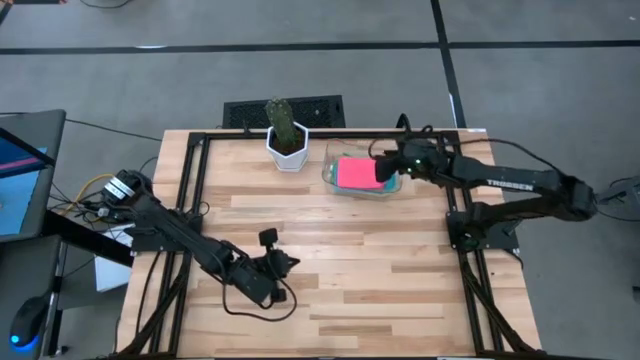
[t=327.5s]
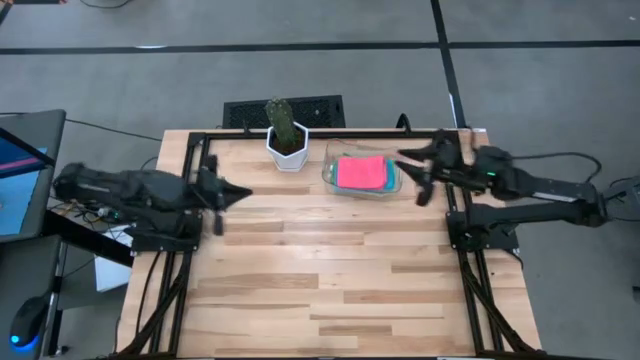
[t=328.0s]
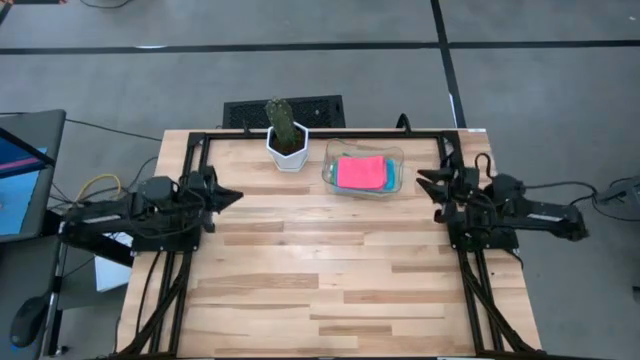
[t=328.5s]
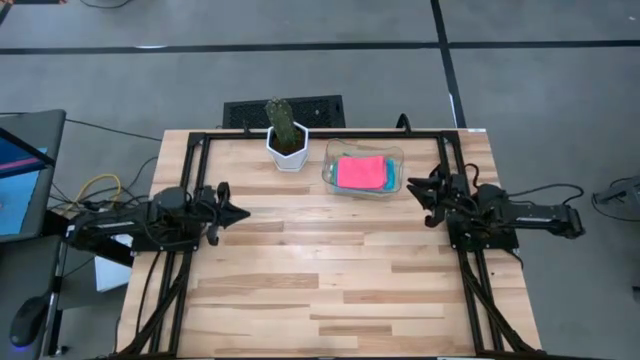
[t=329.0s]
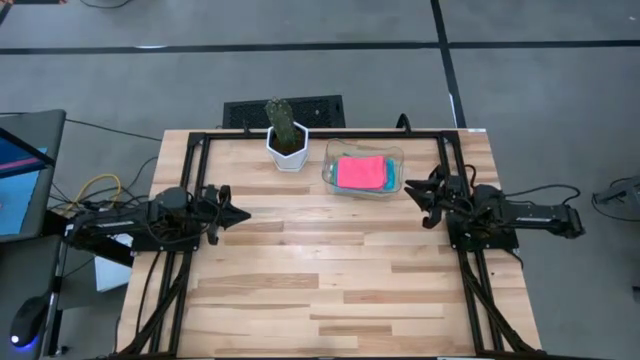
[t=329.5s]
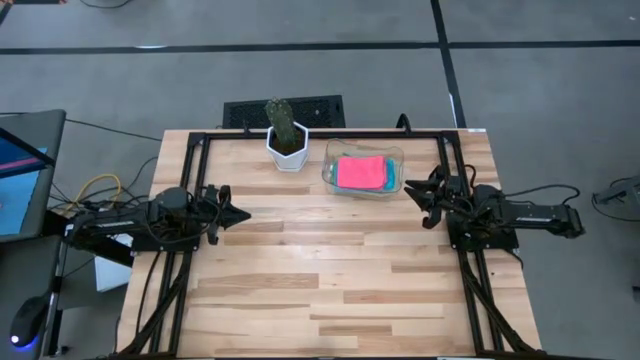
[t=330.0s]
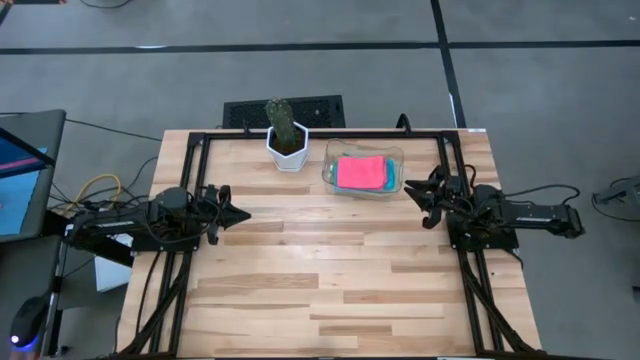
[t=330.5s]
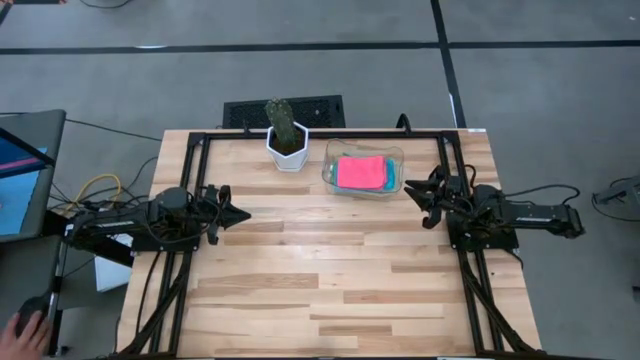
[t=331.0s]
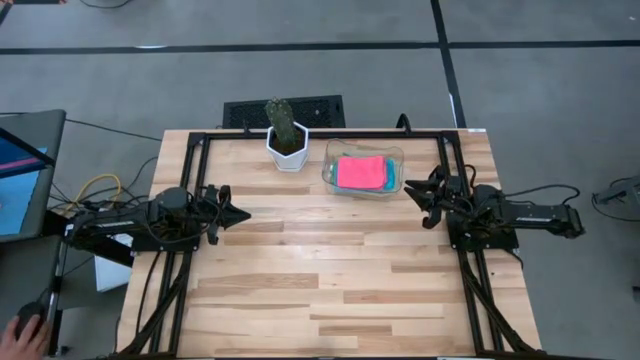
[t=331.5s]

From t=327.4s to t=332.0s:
Task: Fold microfiber towels
Return to Home Position

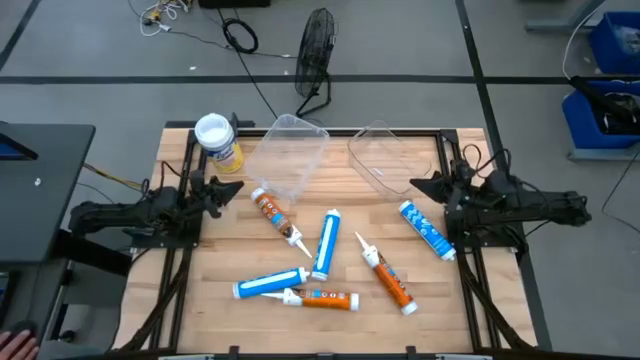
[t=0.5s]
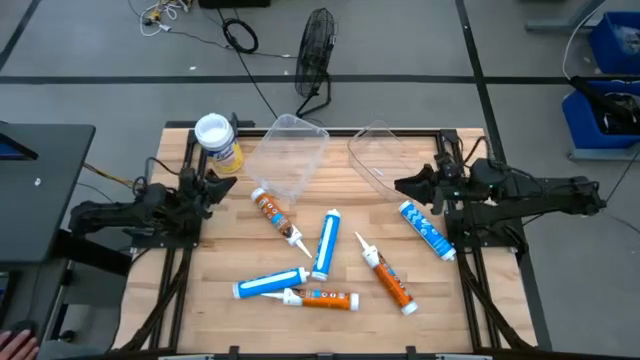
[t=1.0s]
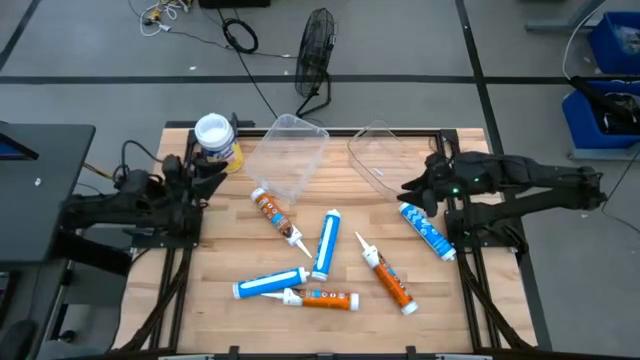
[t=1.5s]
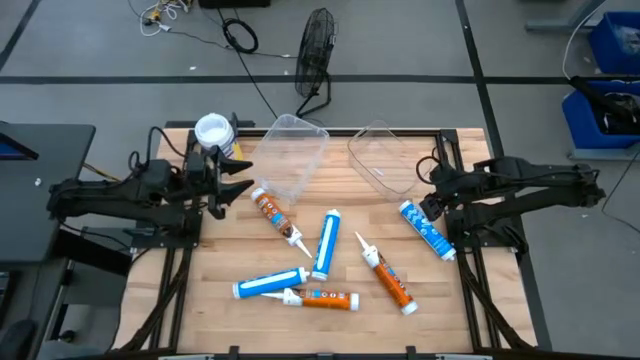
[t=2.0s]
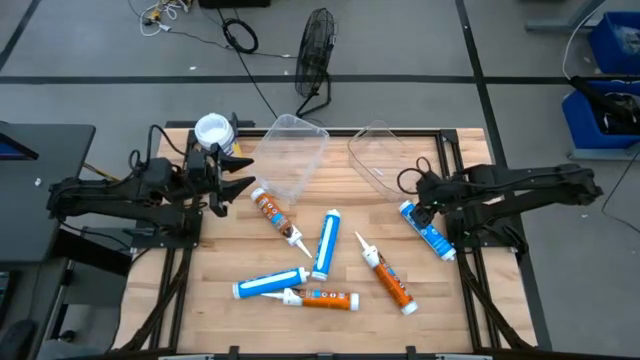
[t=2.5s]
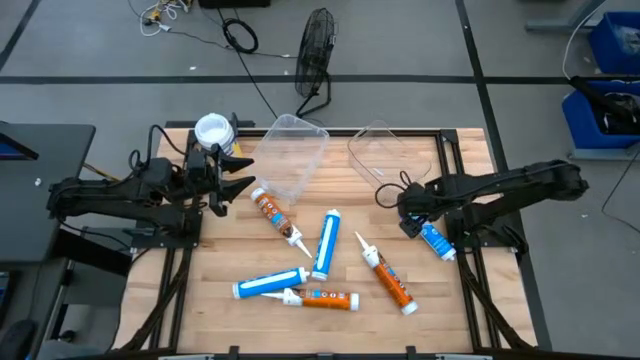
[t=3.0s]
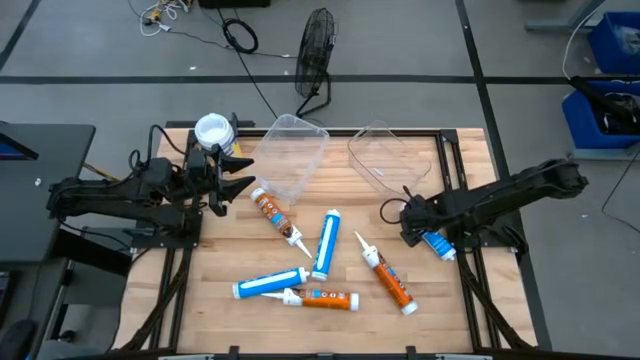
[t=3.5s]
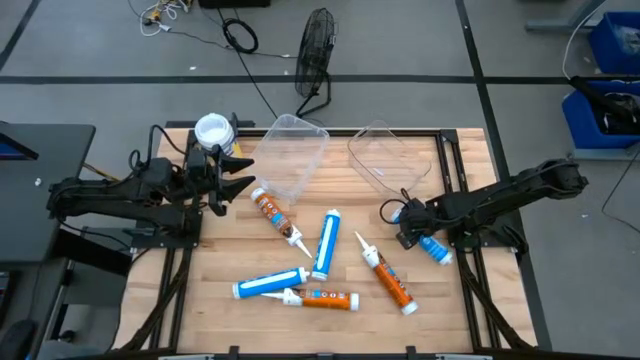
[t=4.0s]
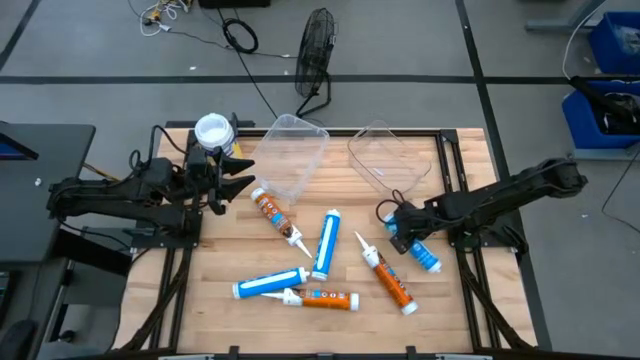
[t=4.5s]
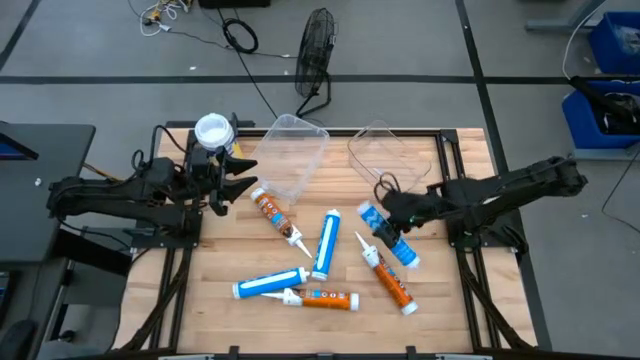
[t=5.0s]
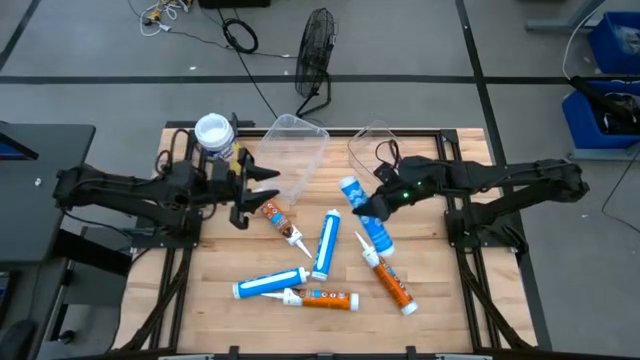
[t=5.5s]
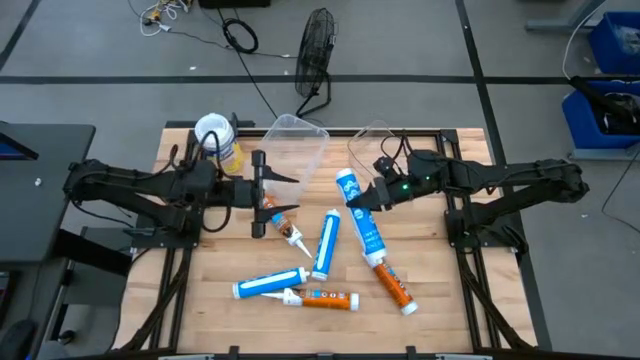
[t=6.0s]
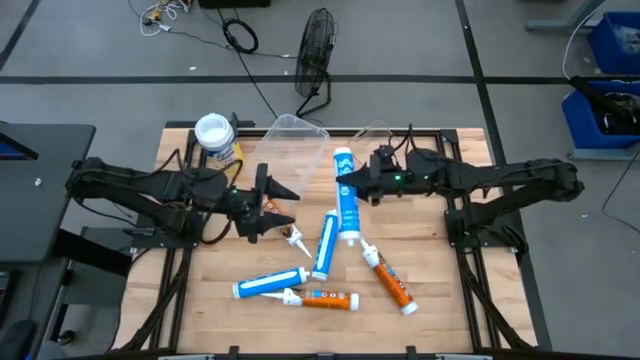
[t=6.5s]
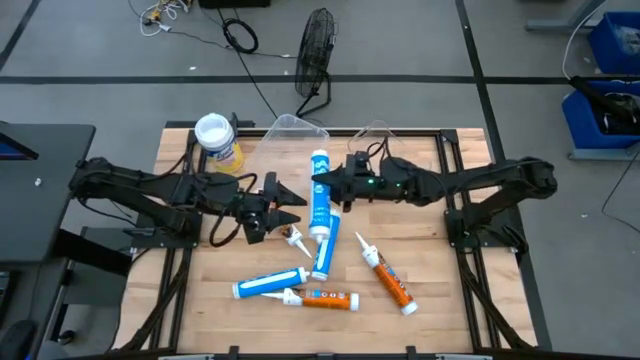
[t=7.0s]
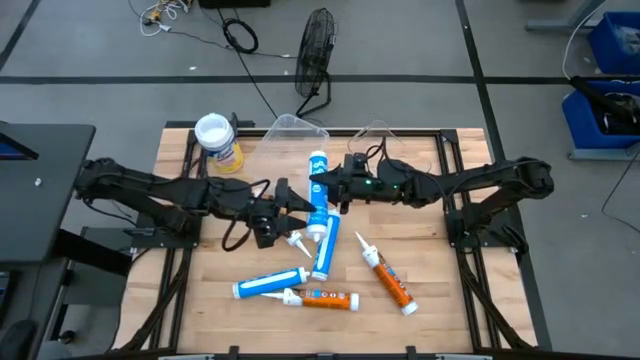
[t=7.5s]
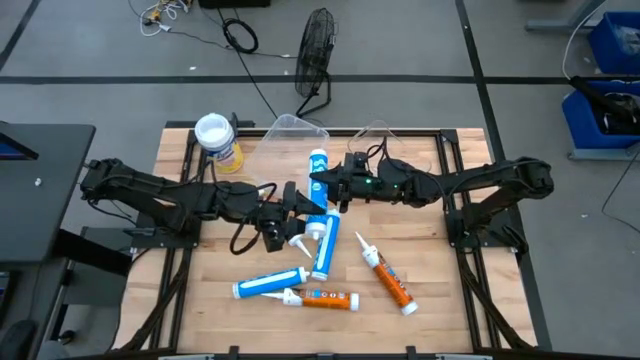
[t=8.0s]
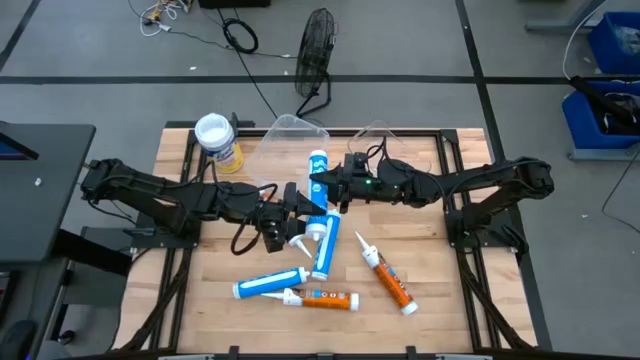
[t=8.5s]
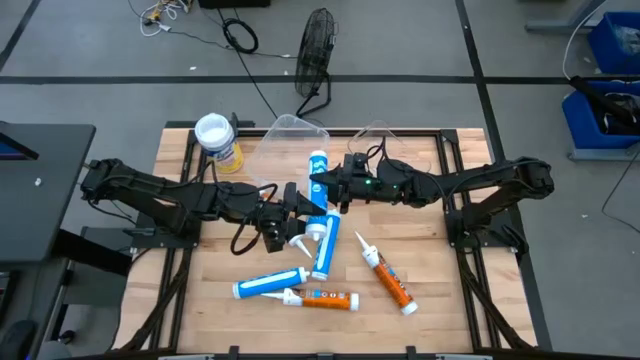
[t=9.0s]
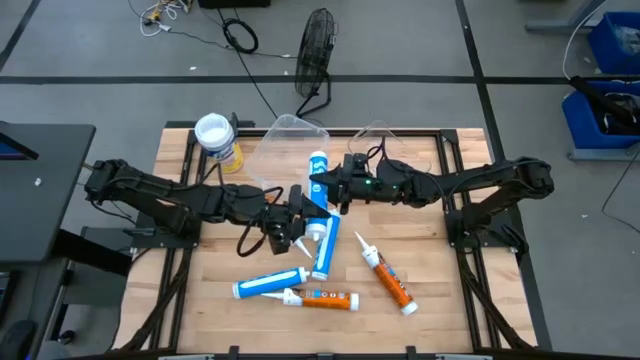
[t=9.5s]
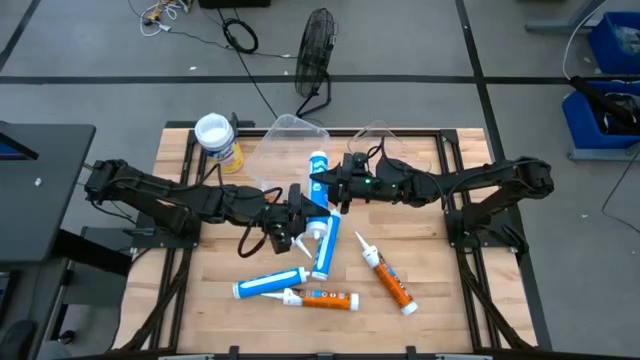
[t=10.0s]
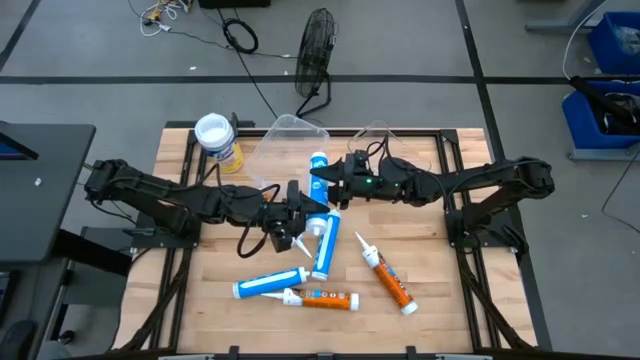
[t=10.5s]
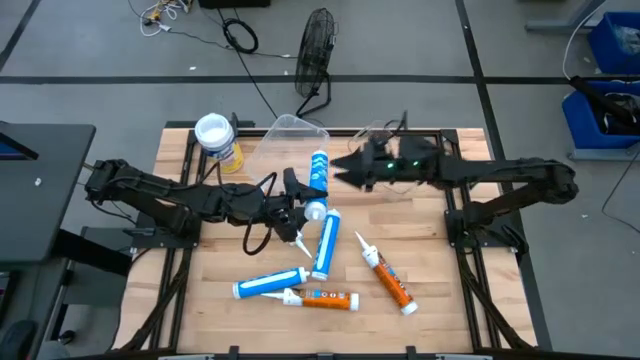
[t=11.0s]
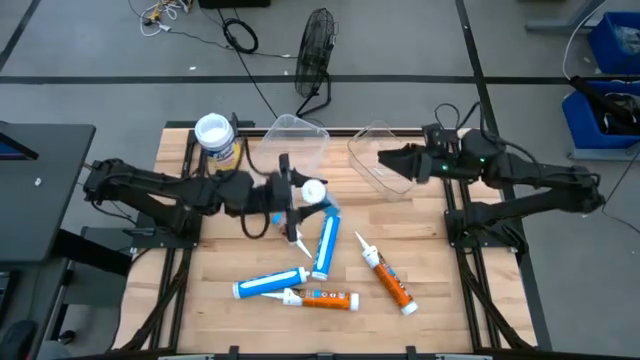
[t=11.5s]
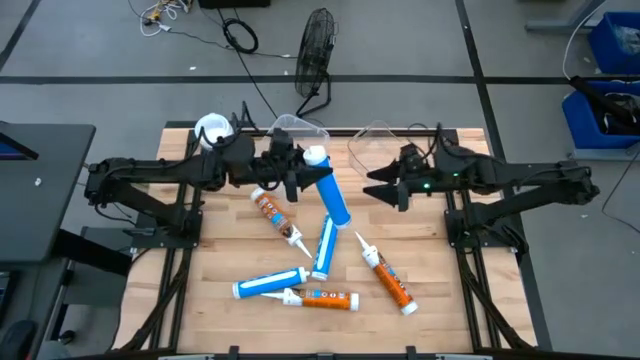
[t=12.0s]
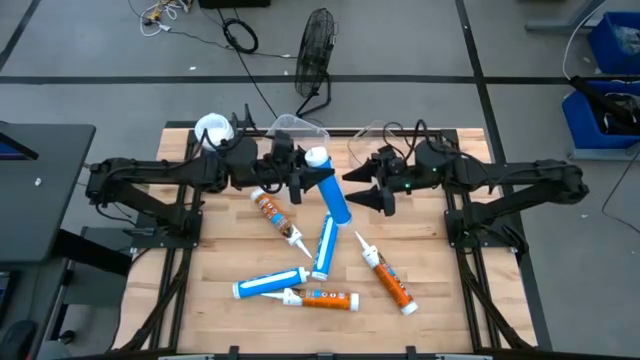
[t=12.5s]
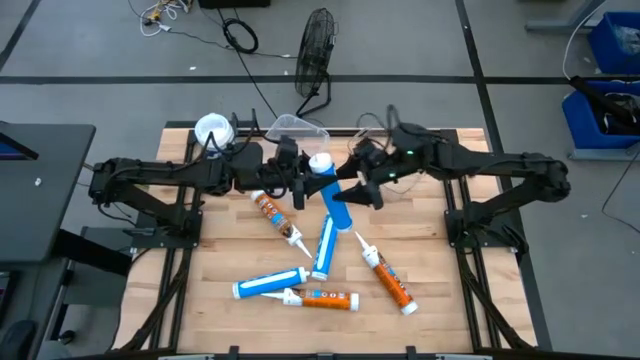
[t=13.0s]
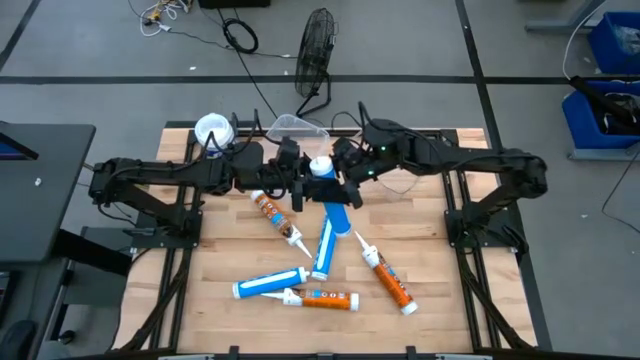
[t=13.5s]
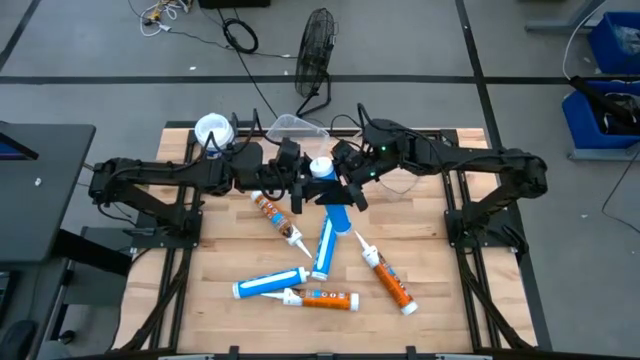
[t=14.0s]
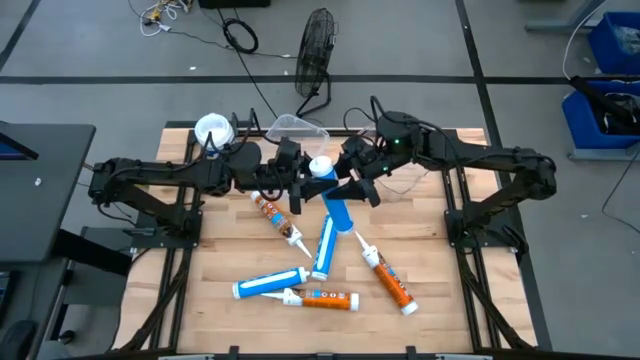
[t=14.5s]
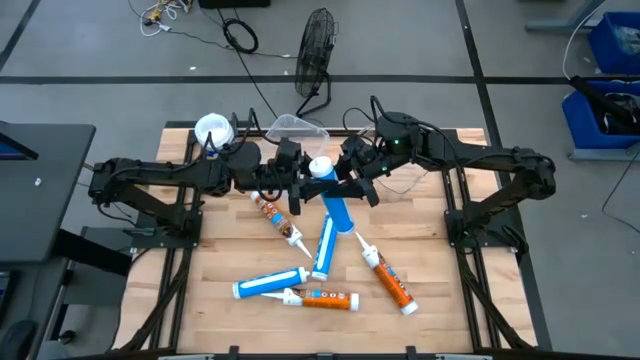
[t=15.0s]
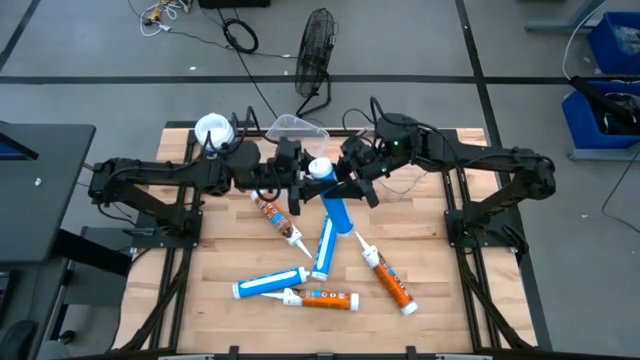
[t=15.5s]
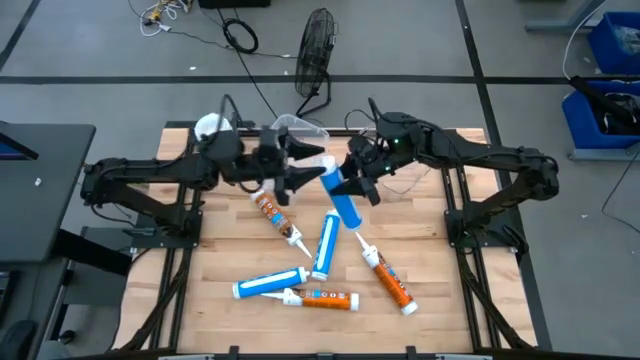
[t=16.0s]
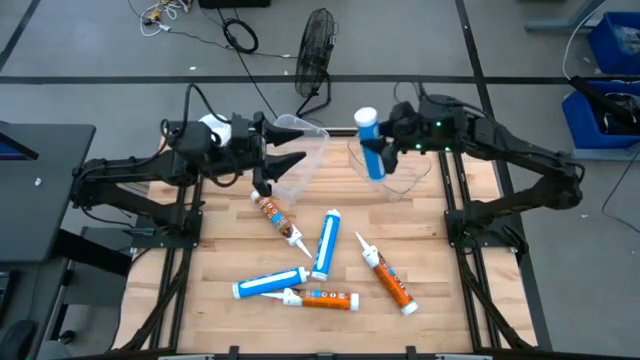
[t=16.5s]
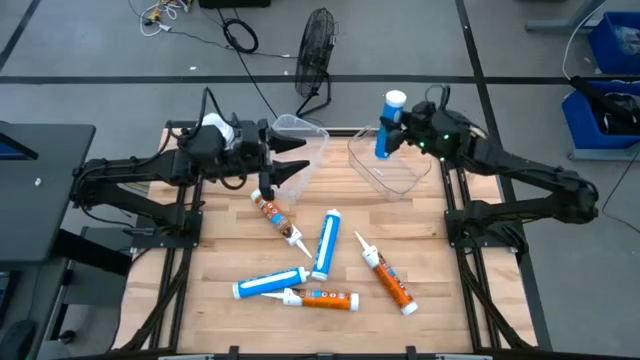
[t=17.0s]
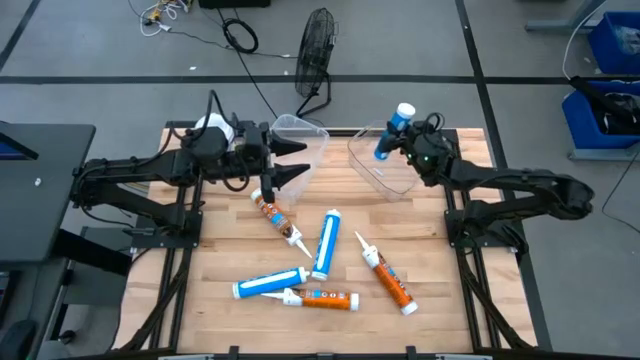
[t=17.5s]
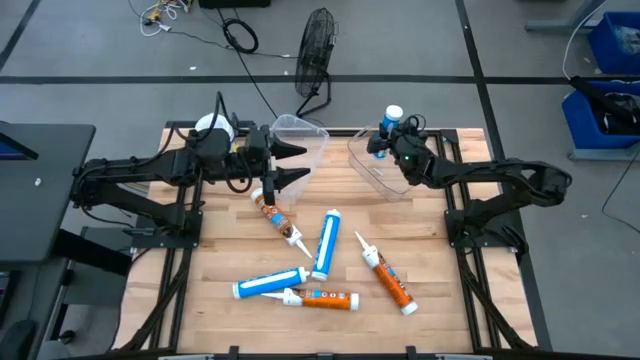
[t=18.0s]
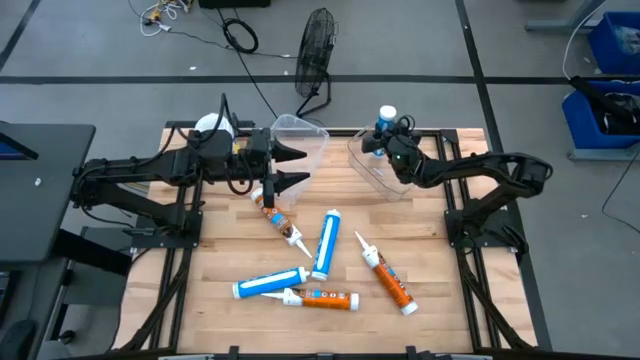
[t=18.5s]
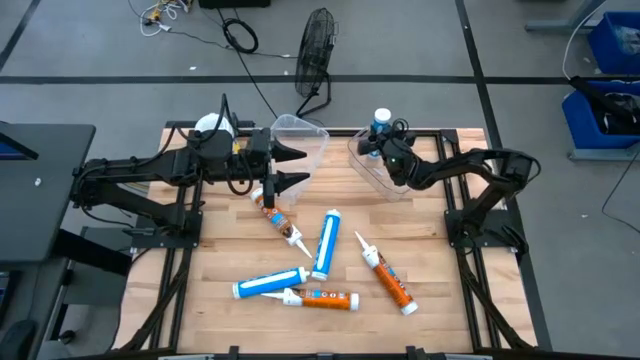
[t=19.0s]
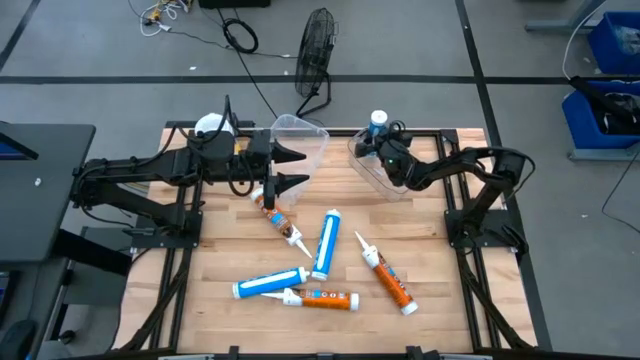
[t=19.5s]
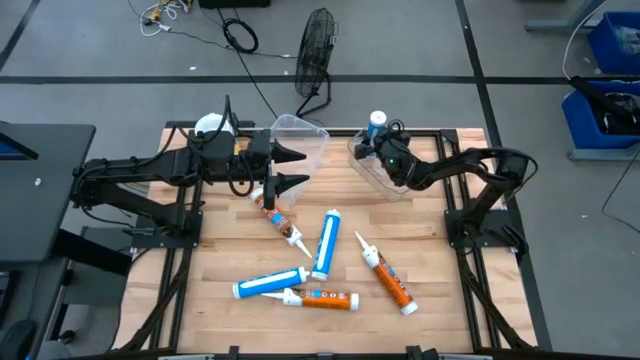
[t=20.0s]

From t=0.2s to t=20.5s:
Task: Pick & place silicon tubes, Sealant and Lysol wipes
Put the right blue sealant into the right transparent bin
